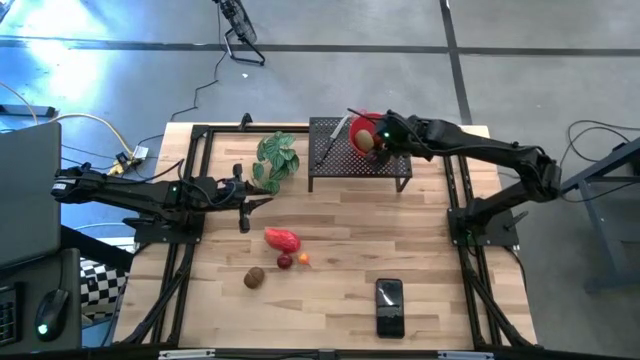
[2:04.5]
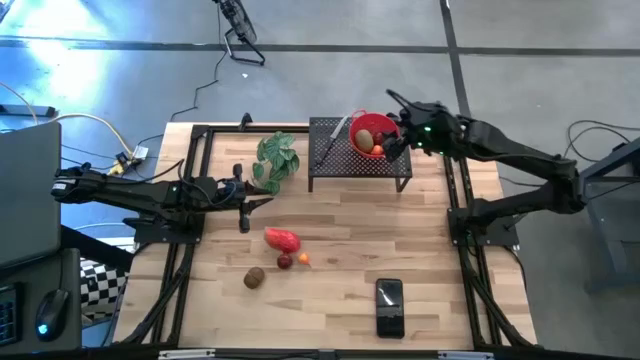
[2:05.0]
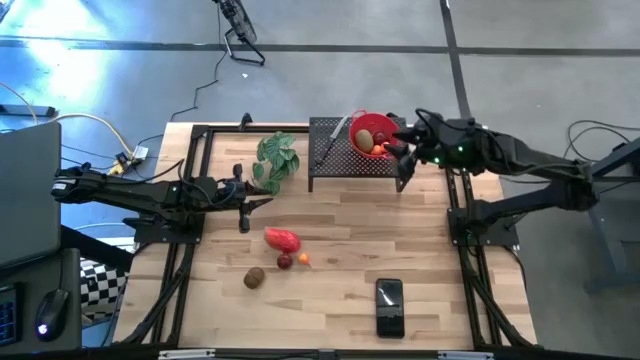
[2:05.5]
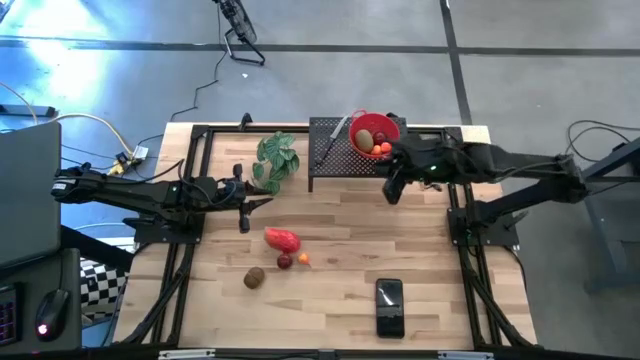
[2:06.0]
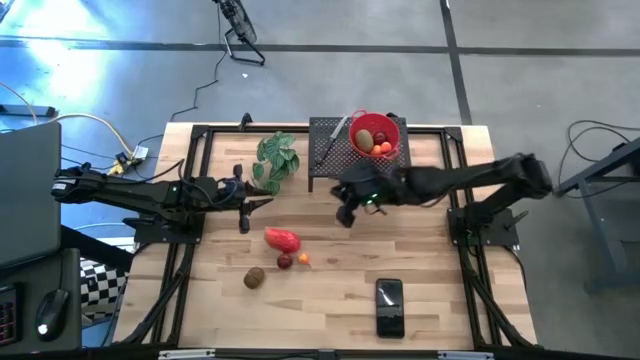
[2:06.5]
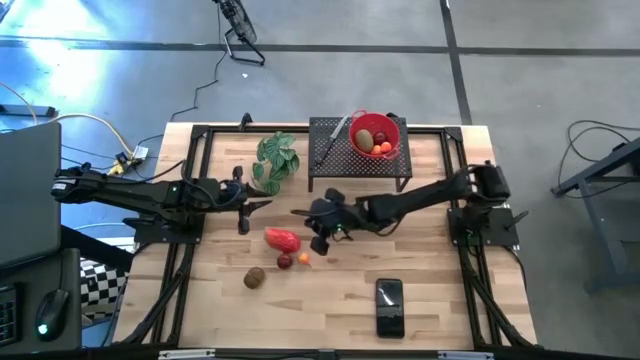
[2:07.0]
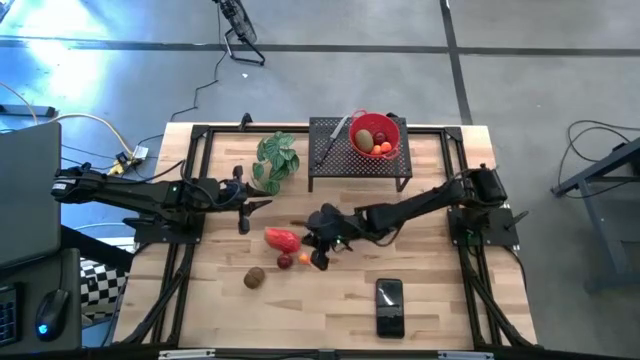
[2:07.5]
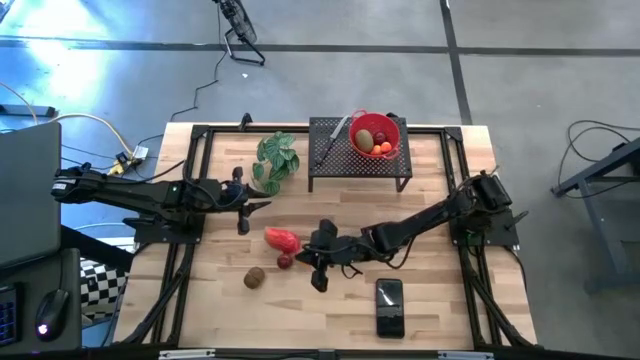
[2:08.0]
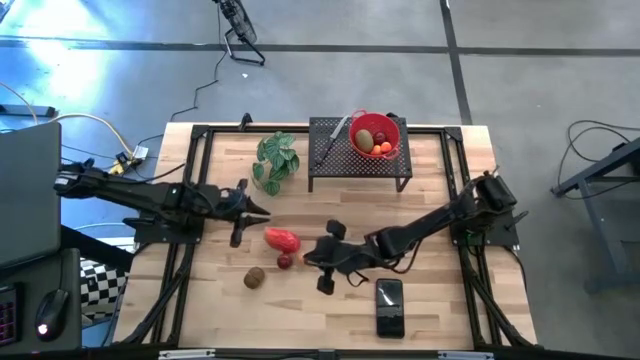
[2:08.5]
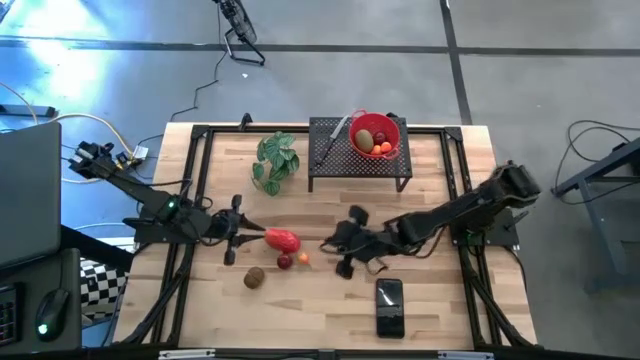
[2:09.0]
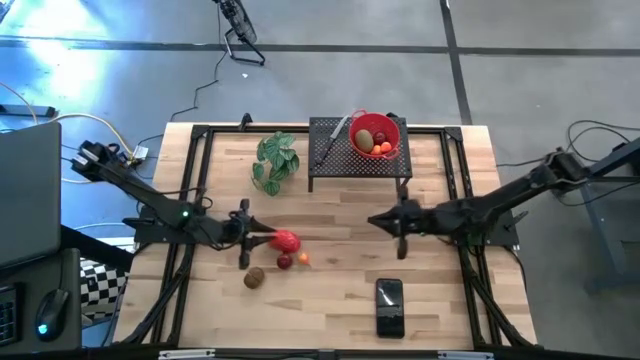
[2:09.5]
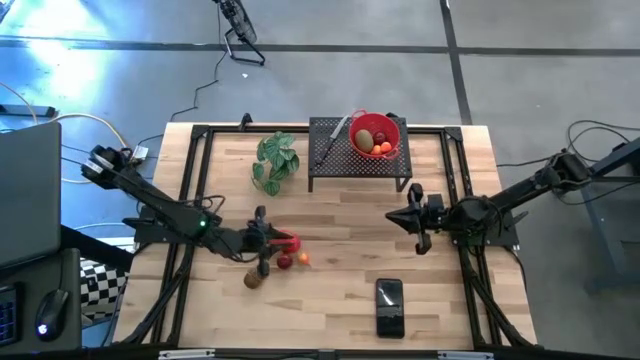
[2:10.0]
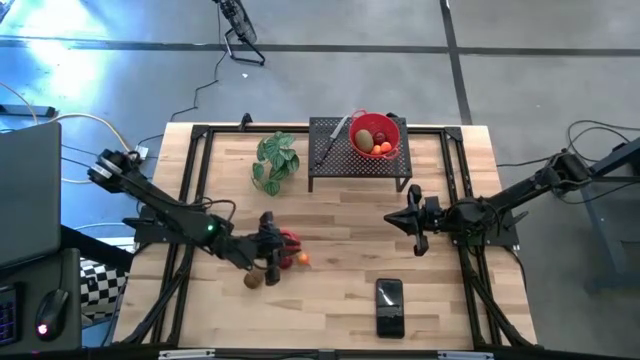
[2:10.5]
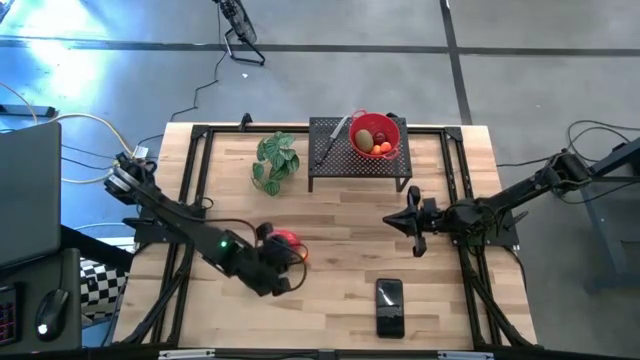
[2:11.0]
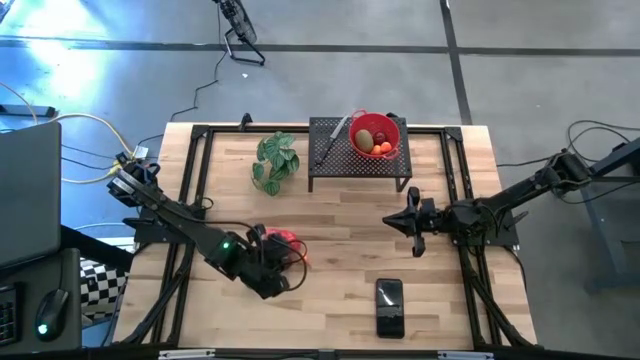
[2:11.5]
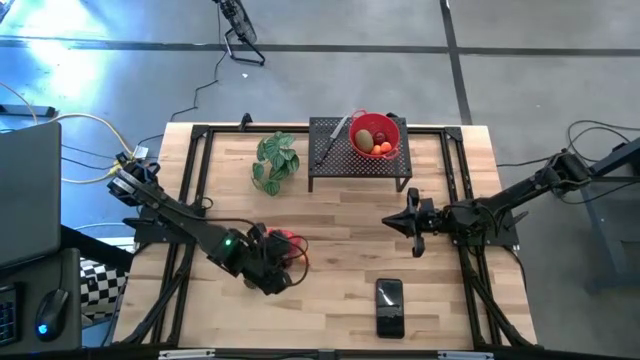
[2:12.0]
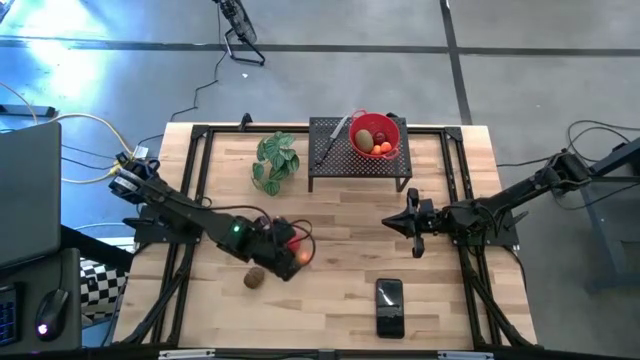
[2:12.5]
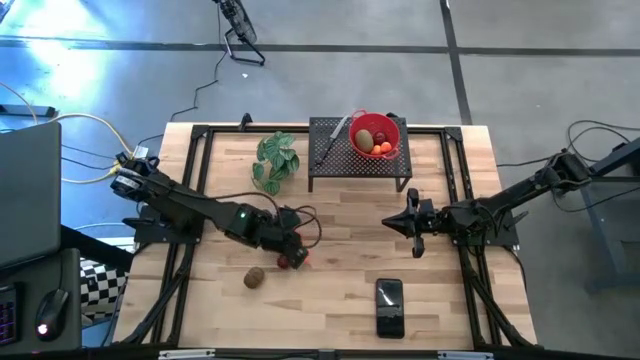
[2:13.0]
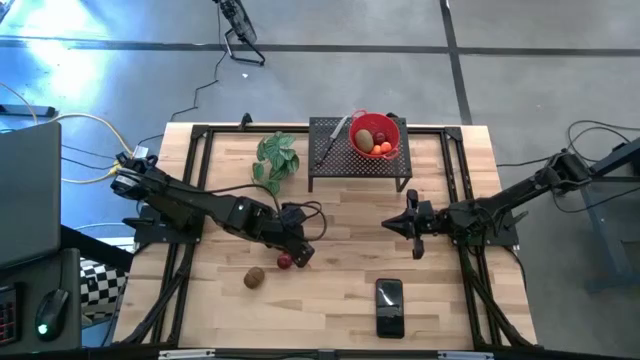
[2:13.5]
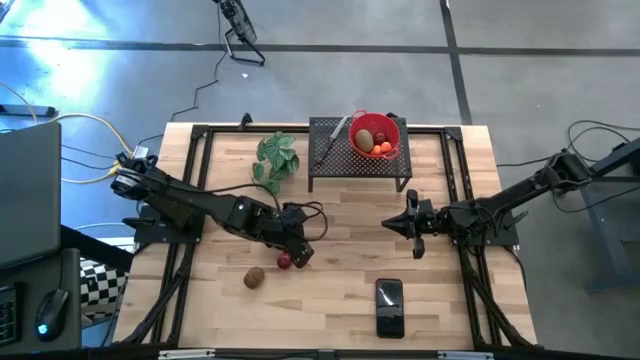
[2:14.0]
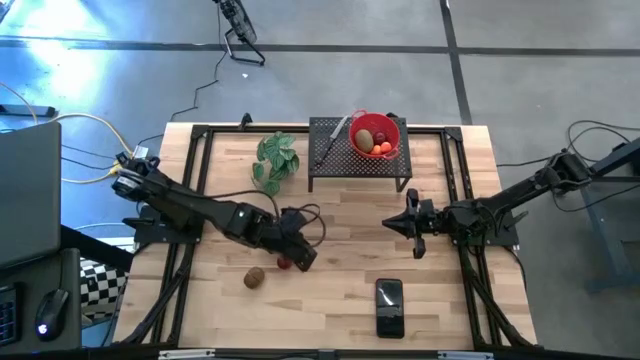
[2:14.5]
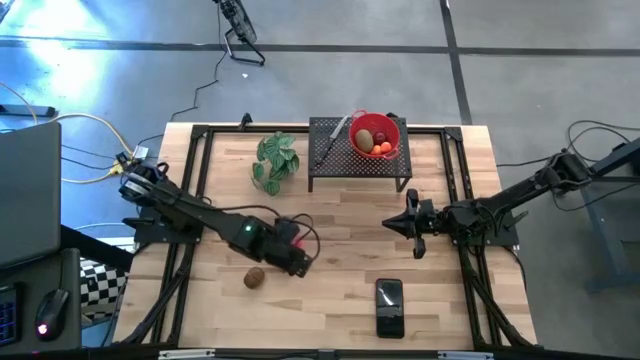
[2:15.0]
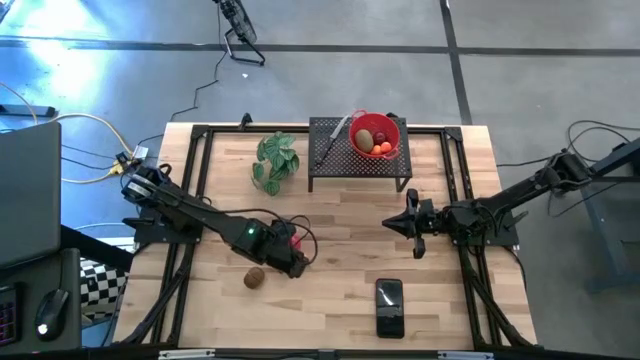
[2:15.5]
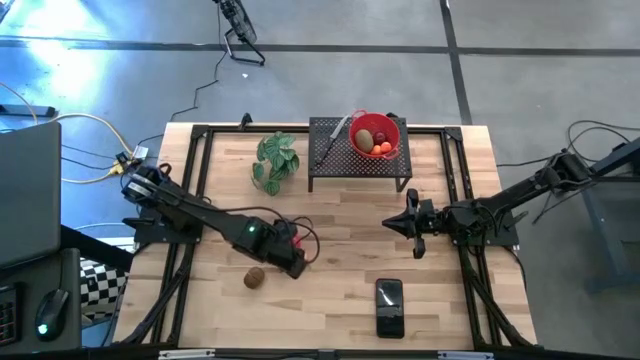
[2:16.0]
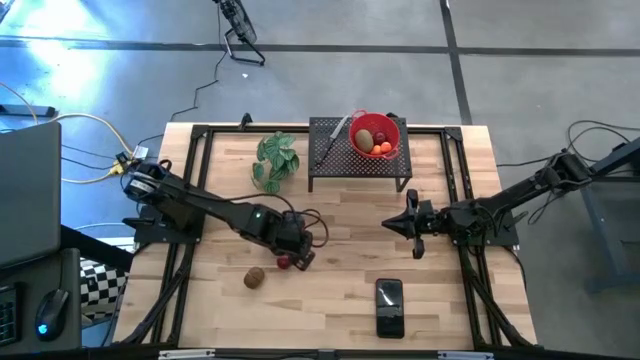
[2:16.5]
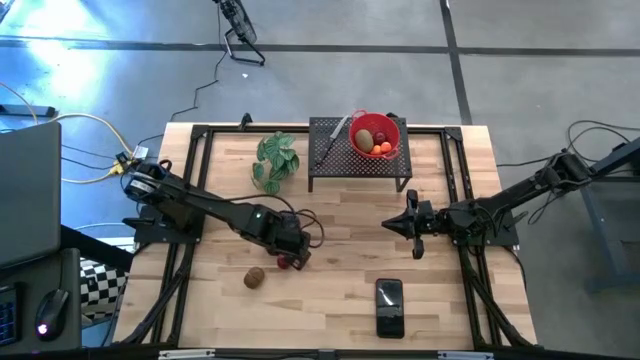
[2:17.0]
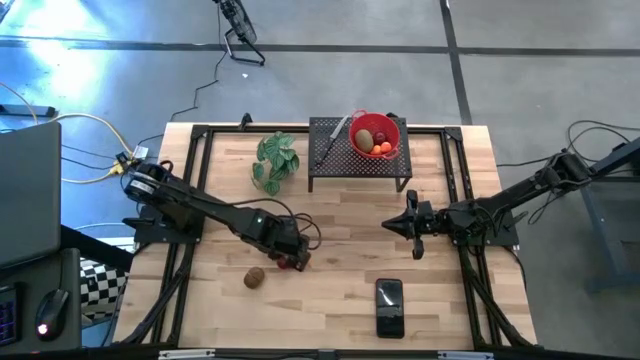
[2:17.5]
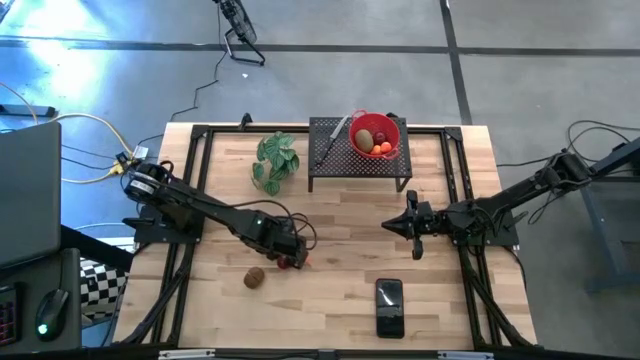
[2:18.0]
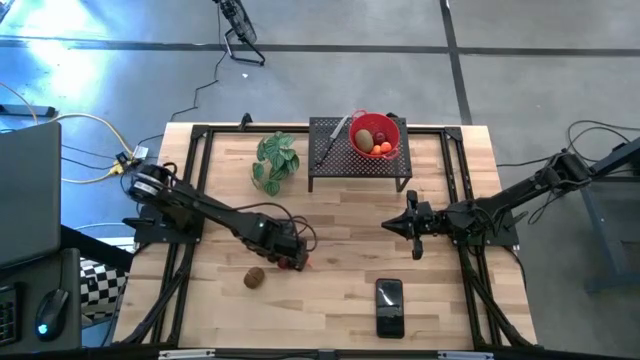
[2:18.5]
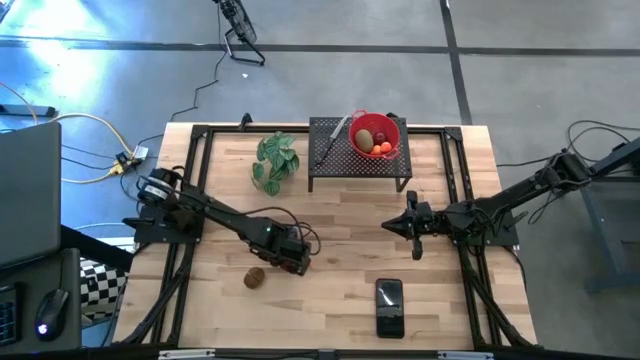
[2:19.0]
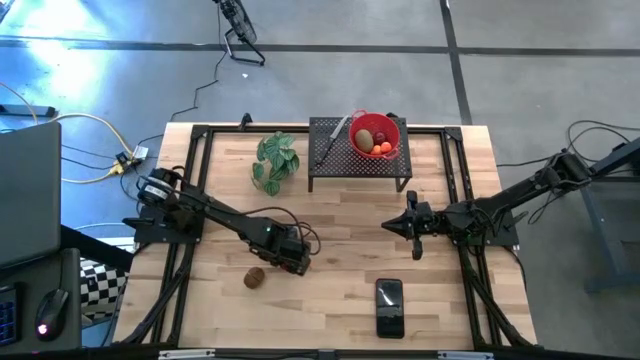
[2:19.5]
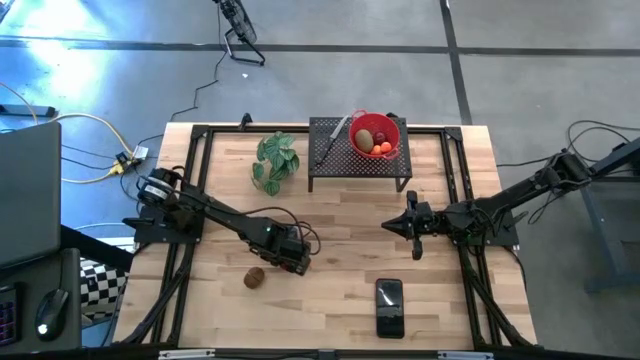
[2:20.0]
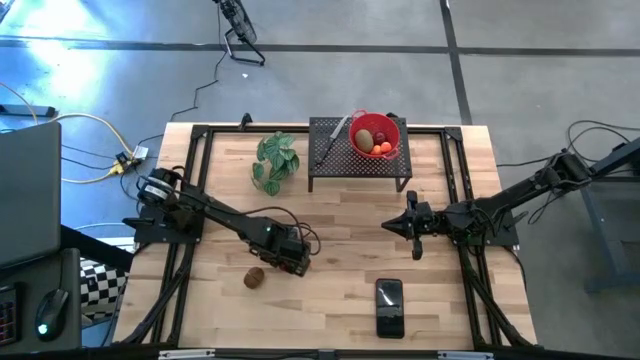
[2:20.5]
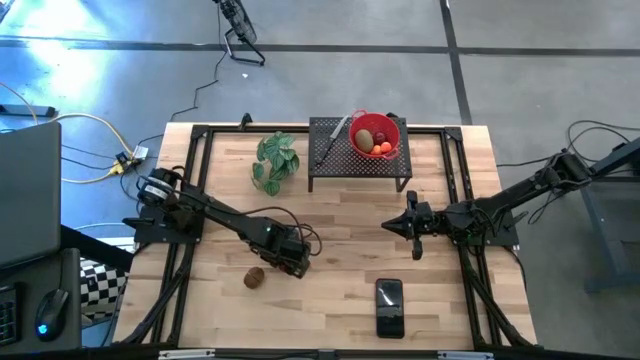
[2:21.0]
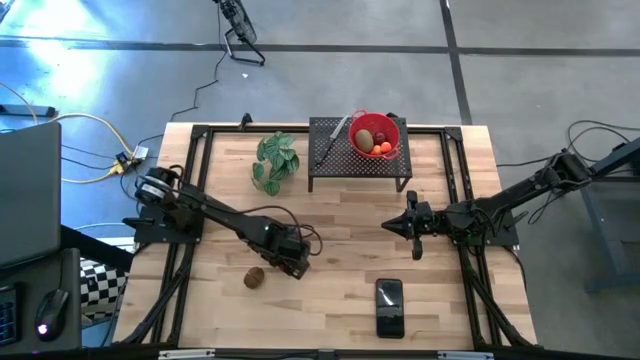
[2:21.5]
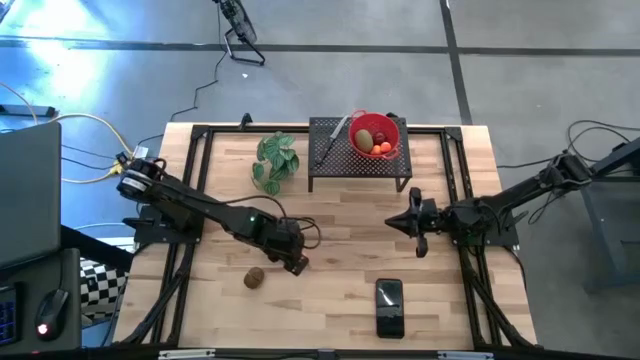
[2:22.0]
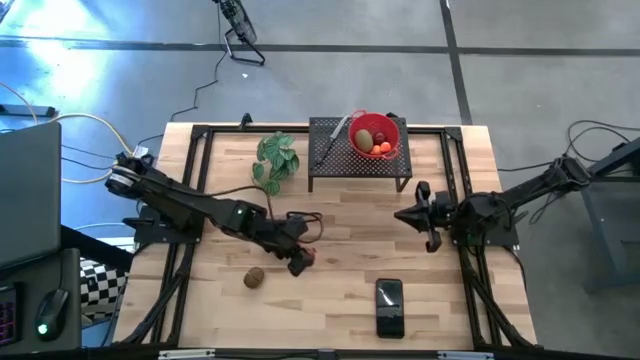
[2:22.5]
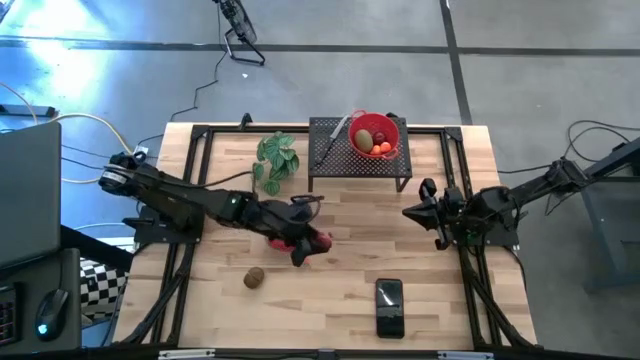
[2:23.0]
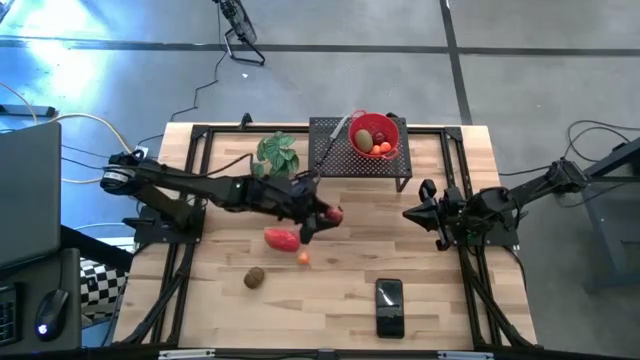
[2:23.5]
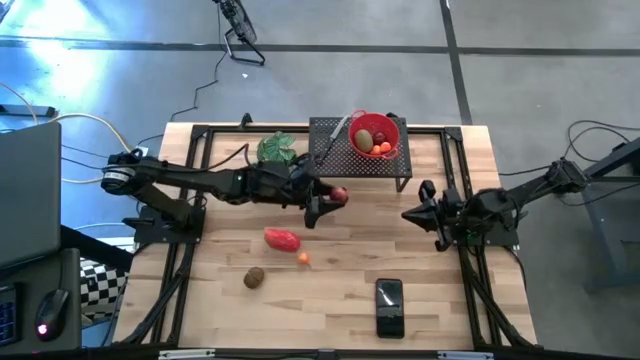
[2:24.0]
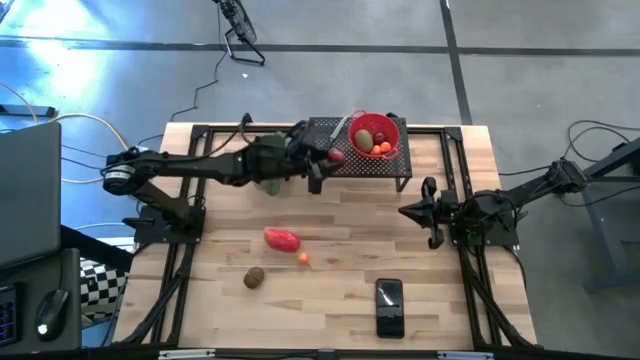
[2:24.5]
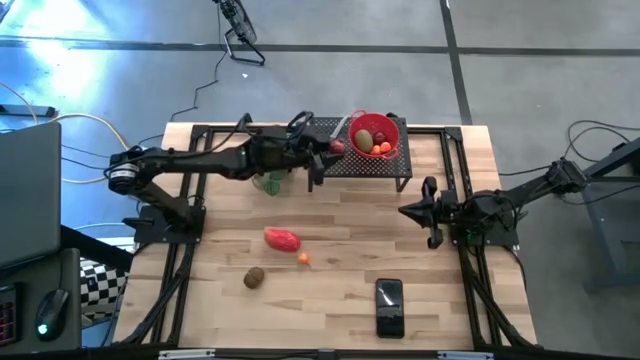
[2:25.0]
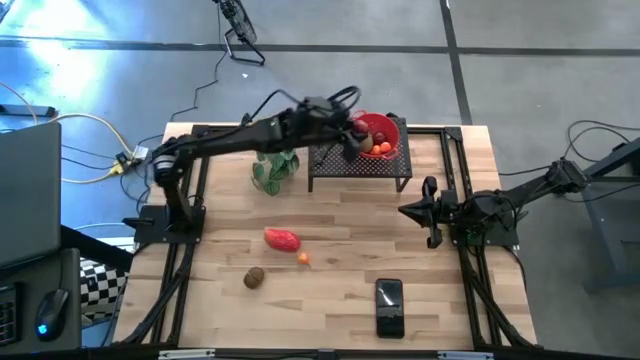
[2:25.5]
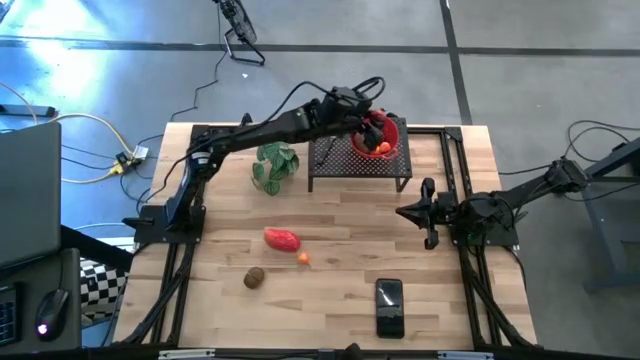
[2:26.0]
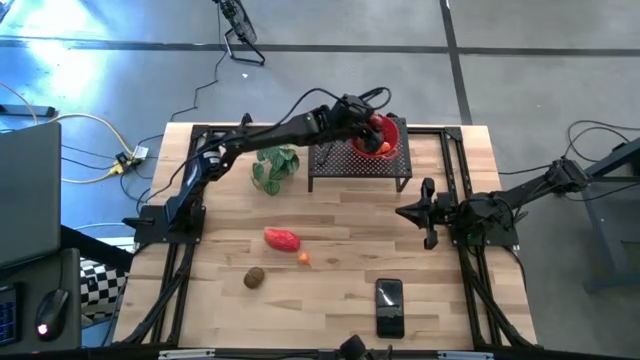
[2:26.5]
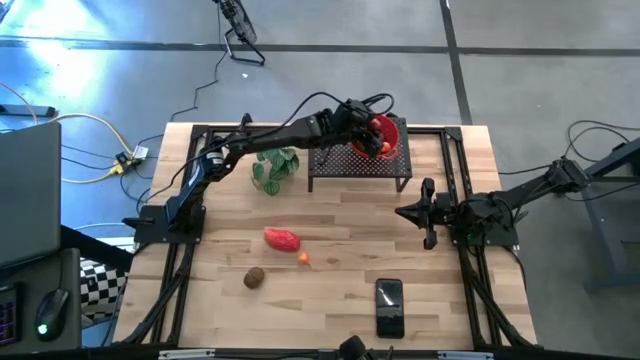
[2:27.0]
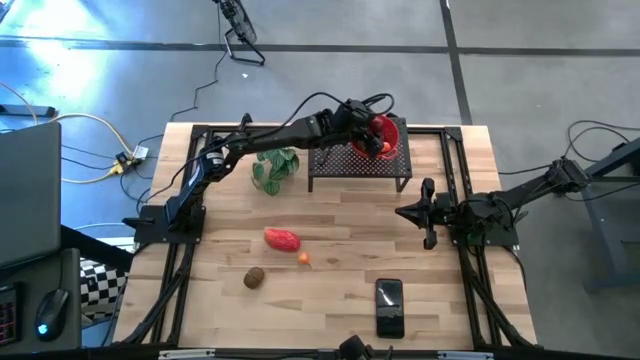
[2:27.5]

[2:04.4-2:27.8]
Task: Pick & Place Fruit
Put the red pomegranate into the red strainer bowl on the shelf
